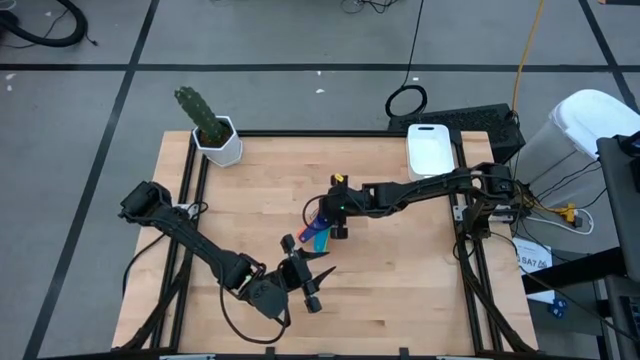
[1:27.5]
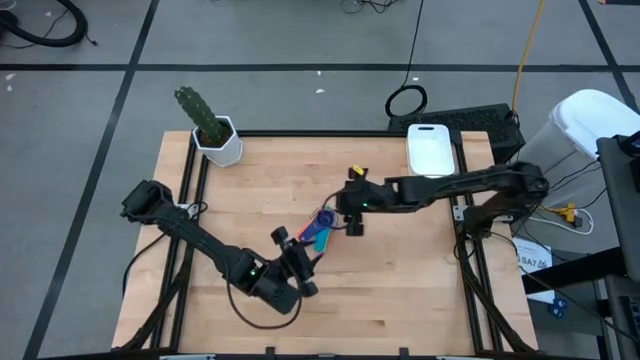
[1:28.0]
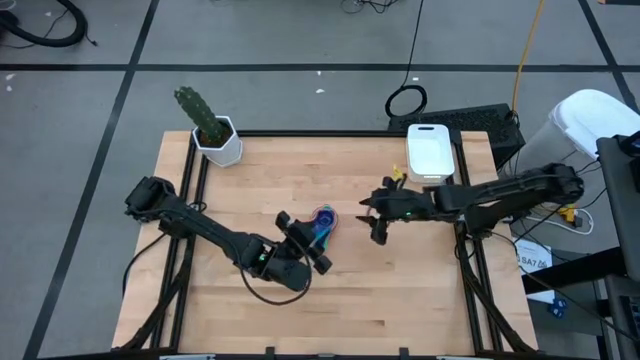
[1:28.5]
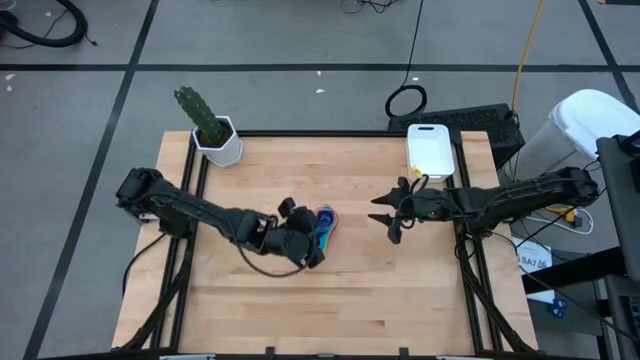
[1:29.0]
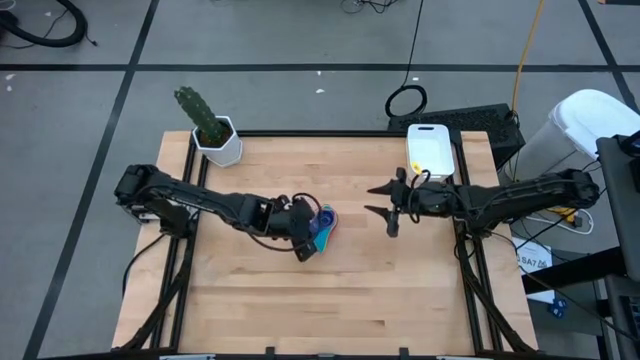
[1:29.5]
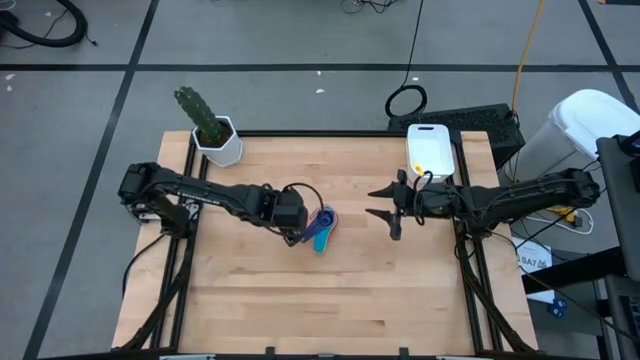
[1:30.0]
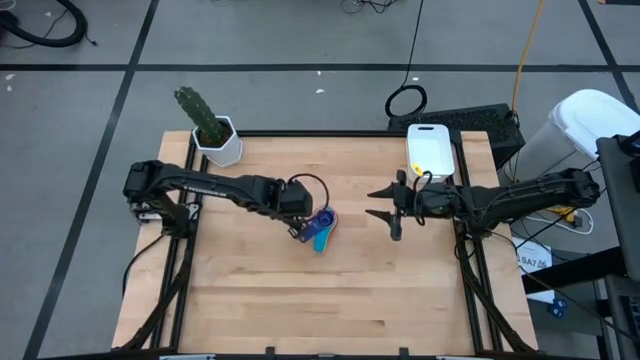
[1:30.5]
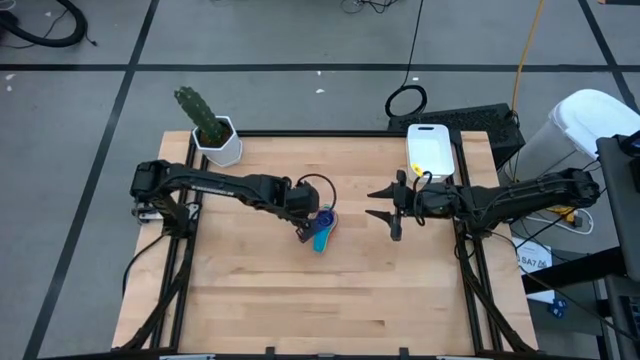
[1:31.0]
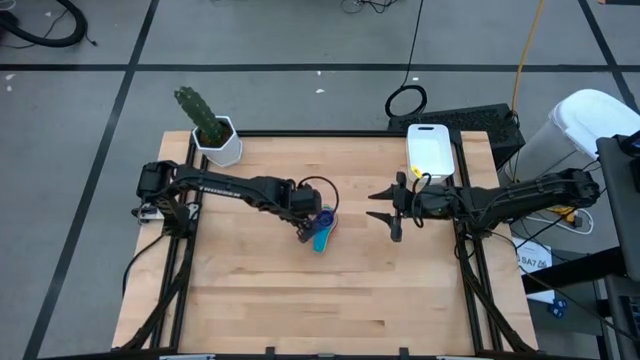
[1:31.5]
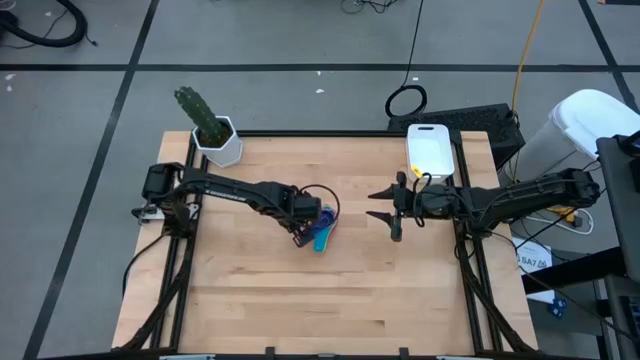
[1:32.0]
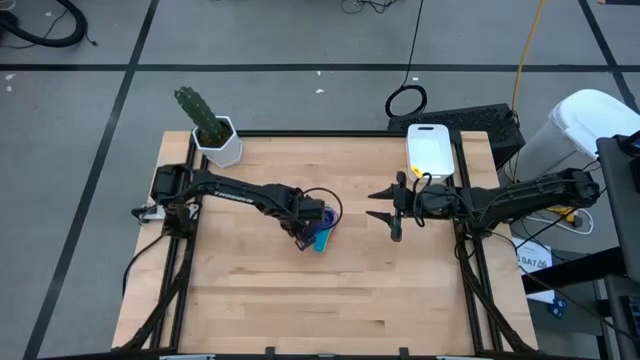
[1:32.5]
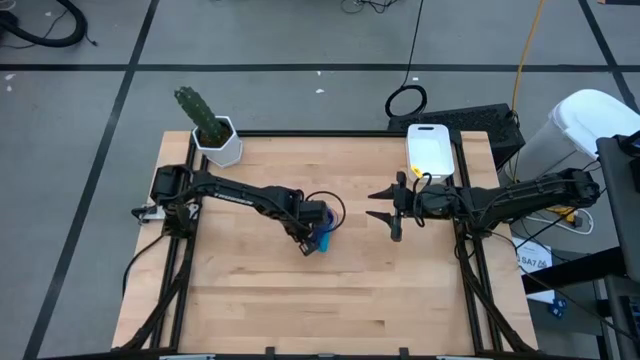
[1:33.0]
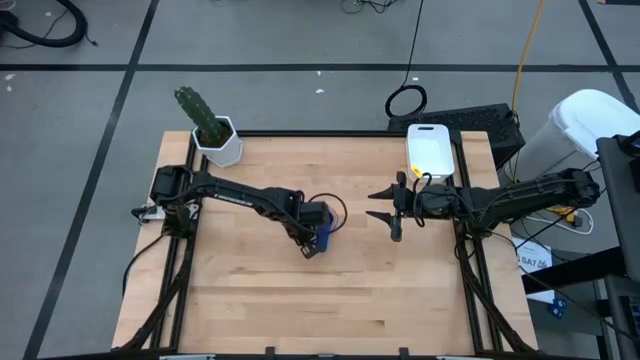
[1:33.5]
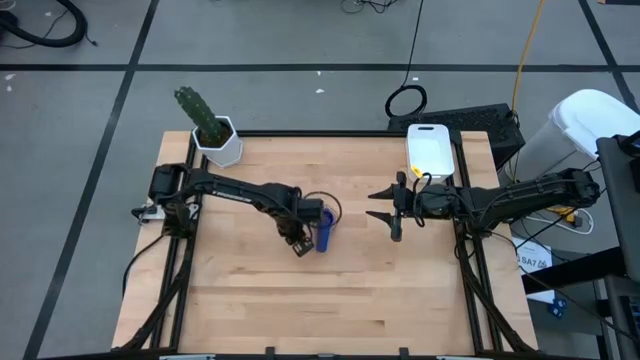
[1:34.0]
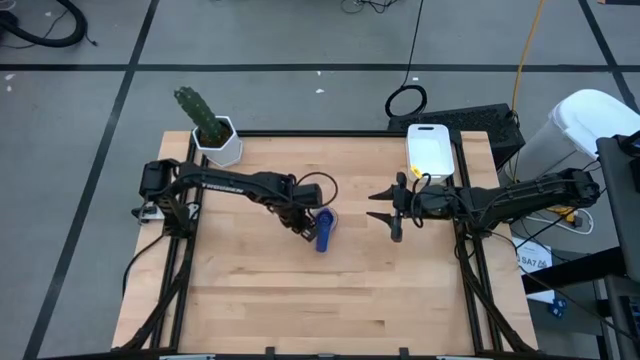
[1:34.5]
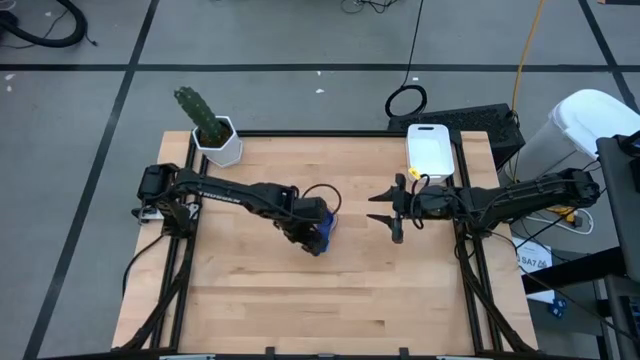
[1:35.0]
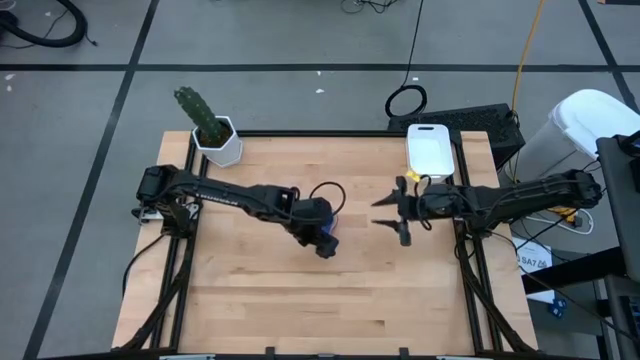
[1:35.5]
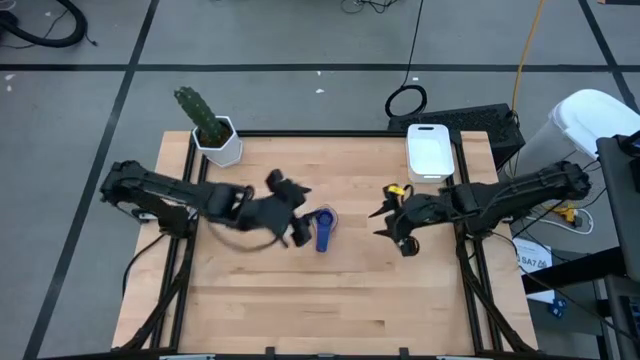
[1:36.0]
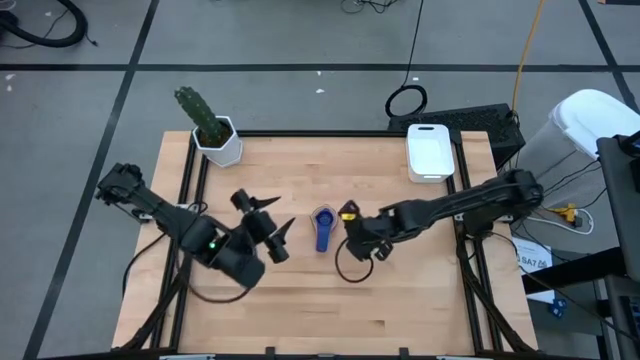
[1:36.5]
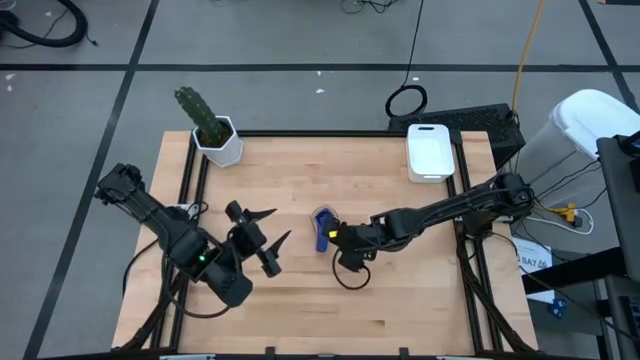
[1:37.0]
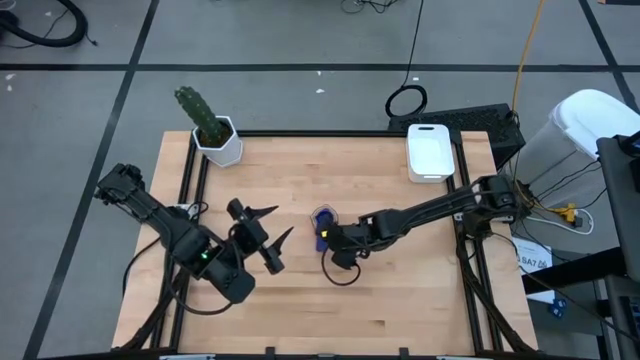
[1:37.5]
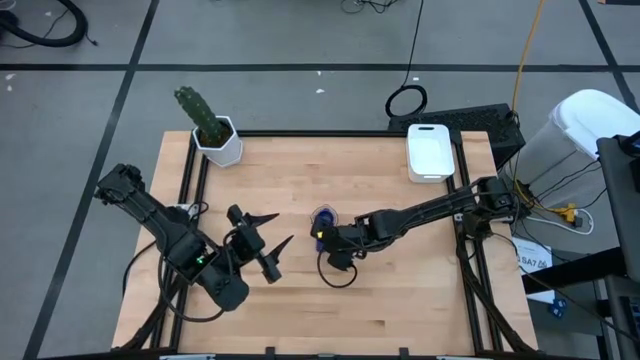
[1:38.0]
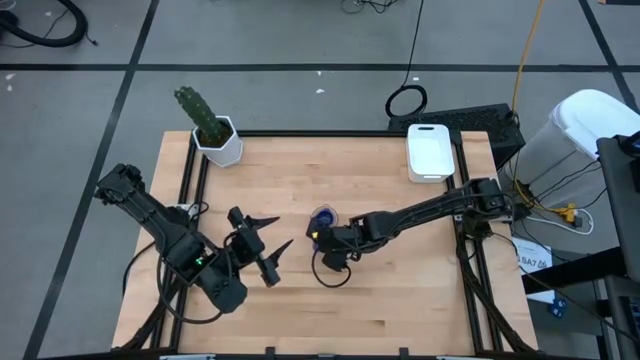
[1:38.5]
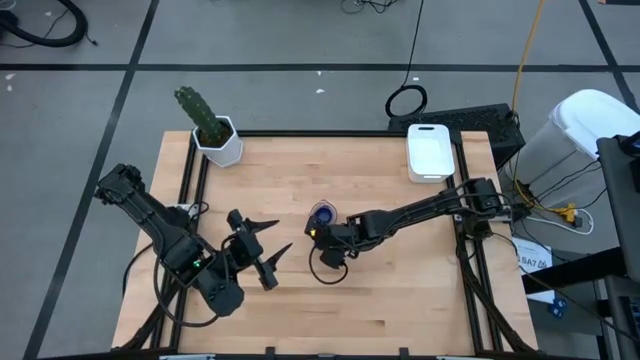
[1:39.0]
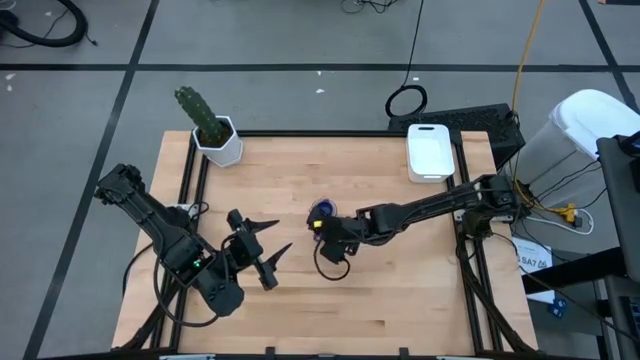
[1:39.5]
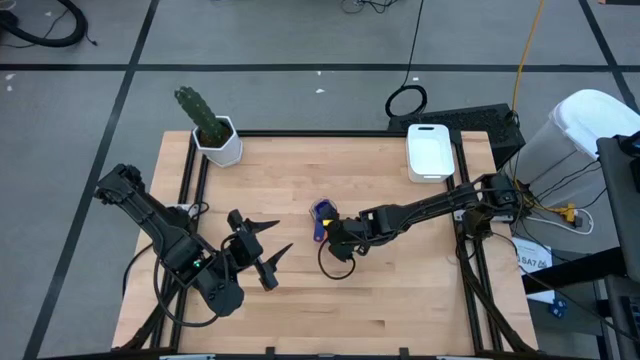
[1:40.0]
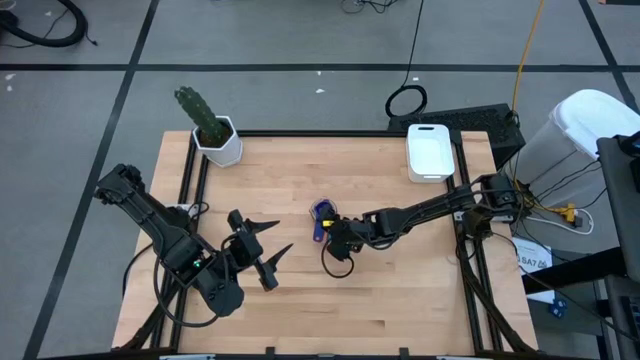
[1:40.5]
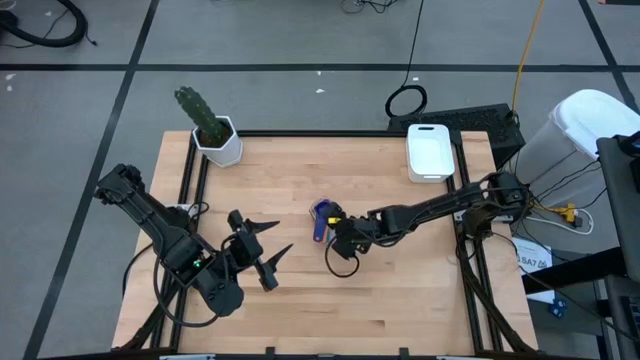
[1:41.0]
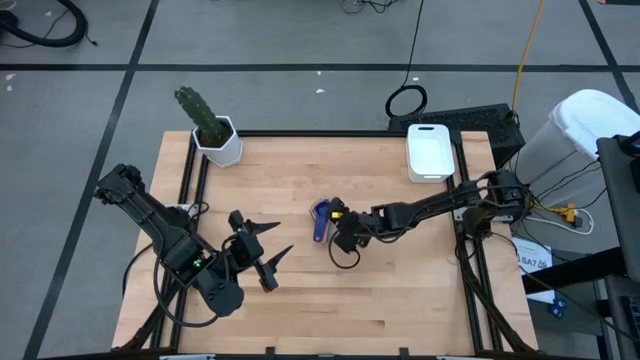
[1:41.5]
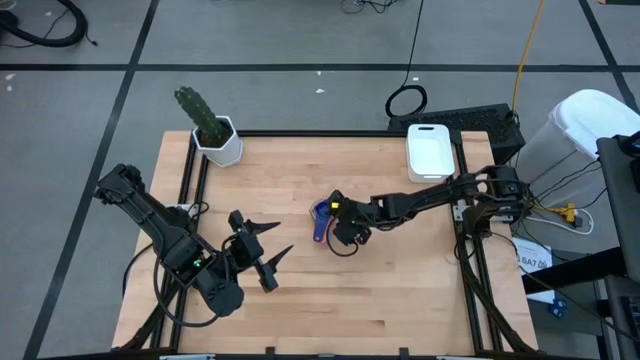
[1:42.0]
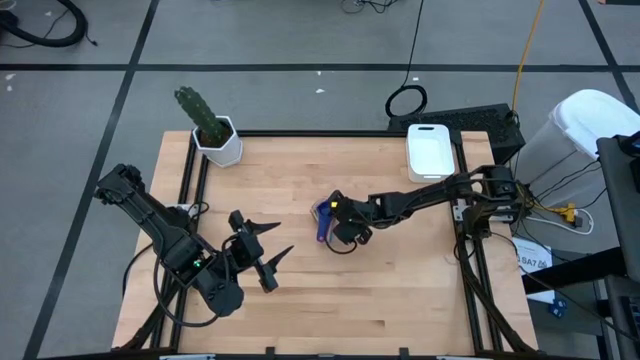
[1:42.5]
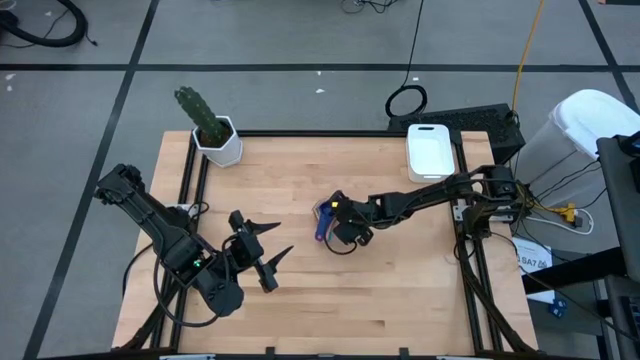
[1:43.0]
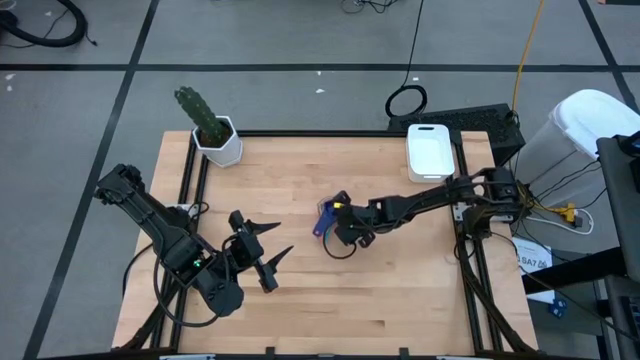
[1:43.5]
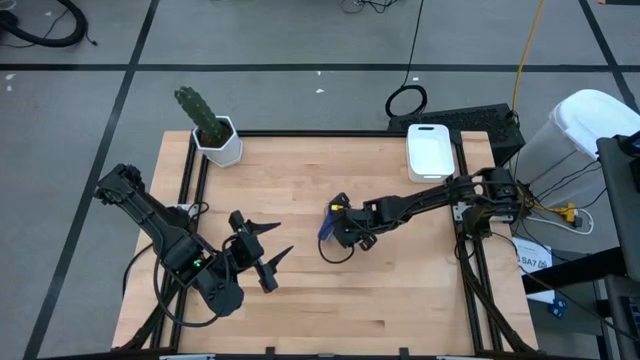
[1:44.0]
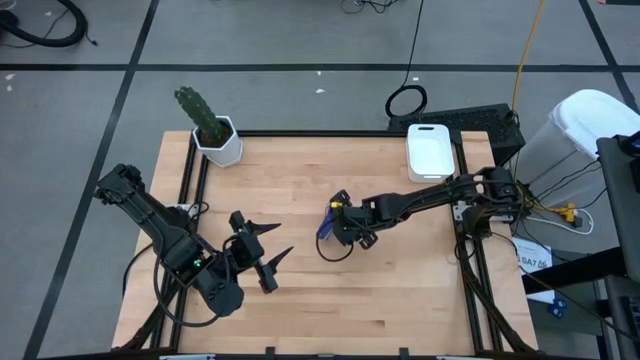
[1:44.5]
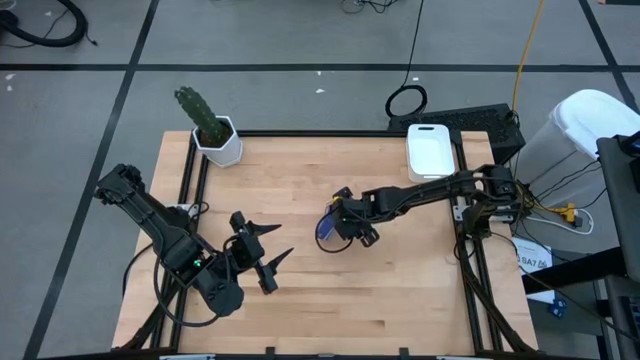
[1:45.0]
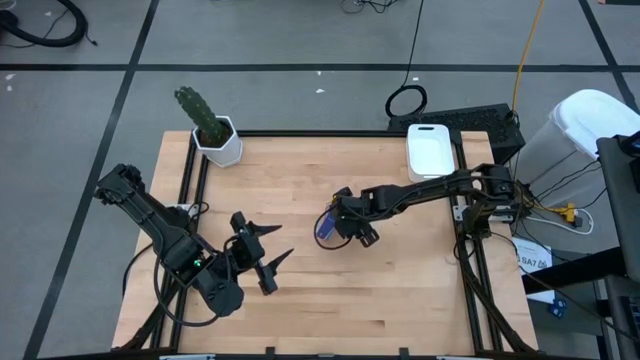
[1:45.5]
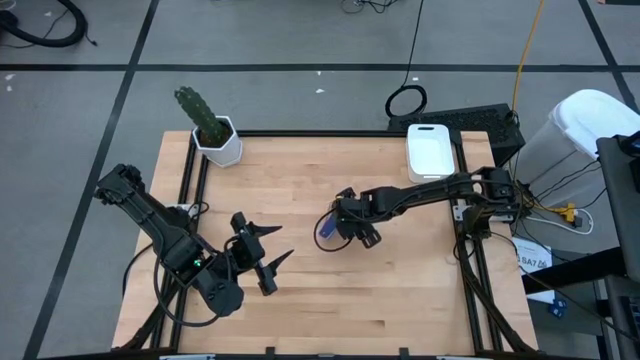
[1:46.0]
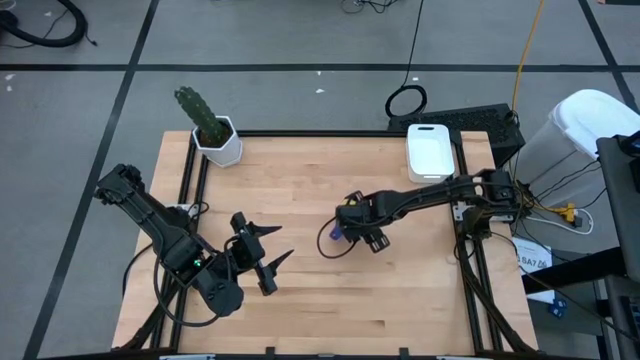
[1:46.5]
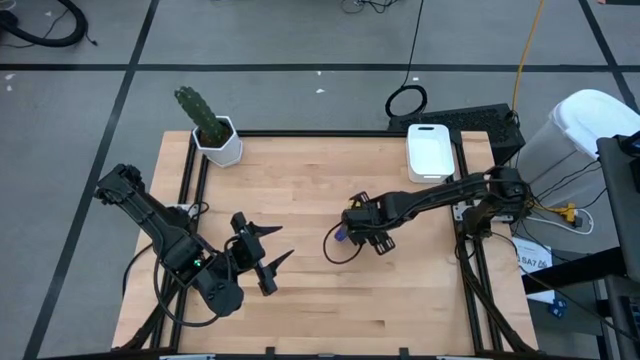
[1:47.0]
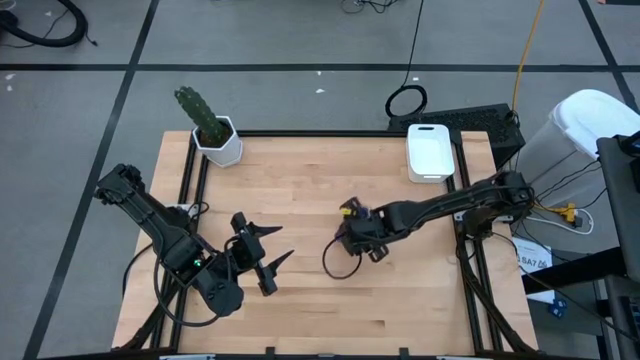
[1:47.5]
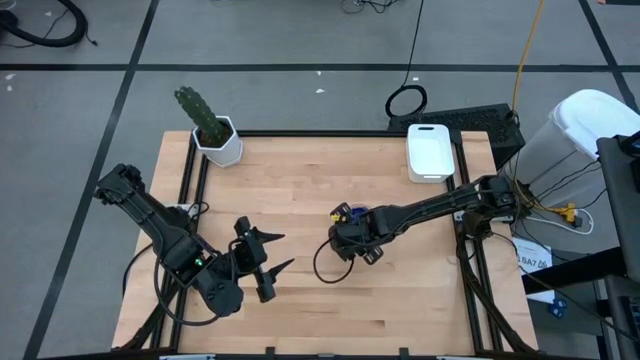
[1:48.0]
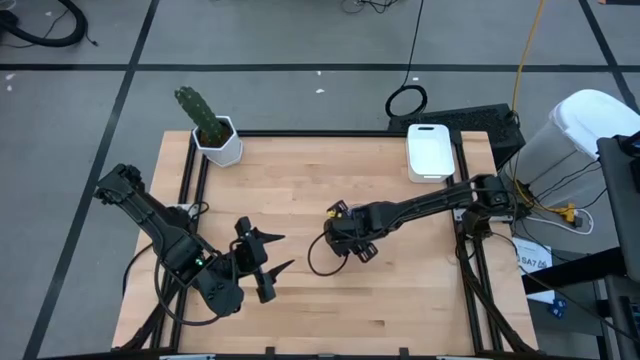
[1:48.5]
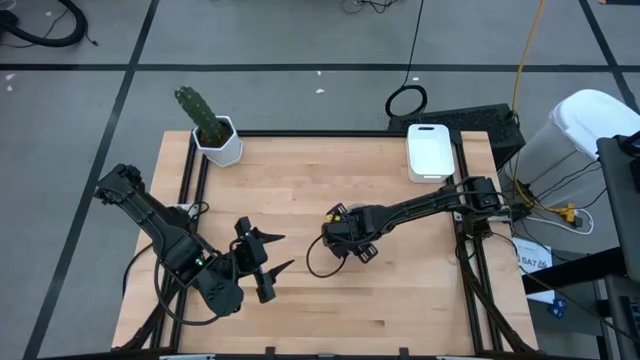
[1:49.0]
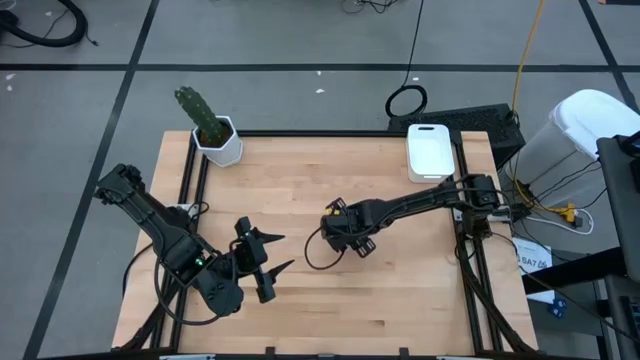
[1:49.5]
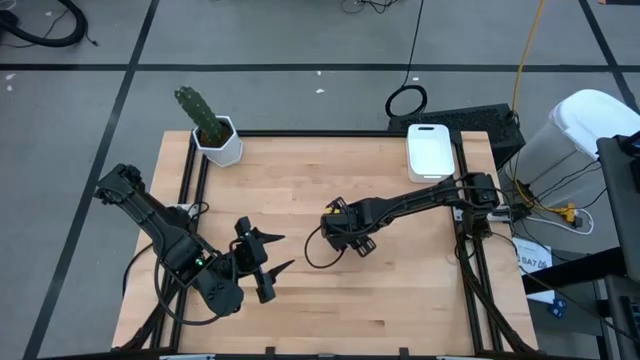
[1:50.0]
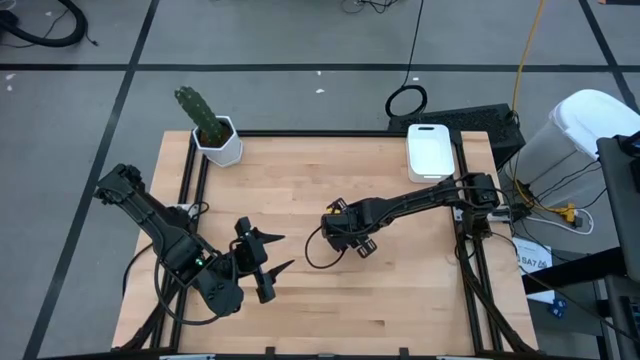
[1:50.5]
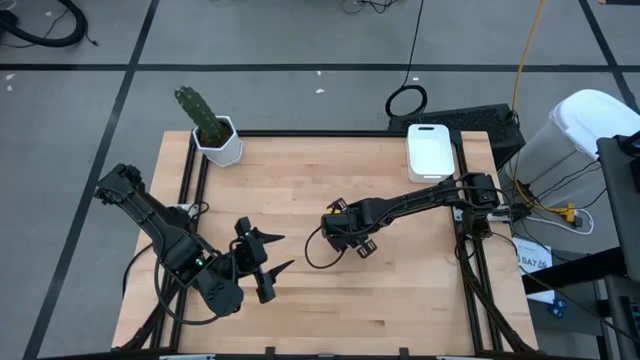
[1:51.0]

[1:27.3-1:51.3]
Task: Nest measuring cups in basket
Adjust the stacked measuring cups on the table
